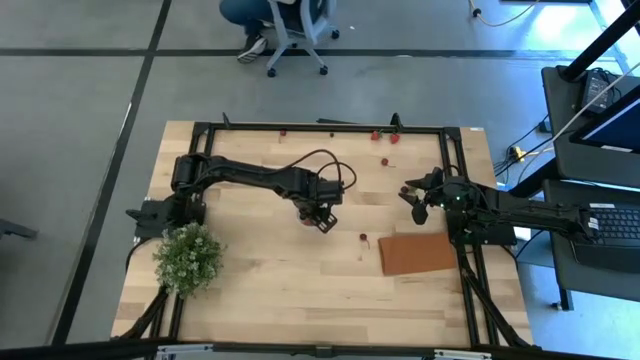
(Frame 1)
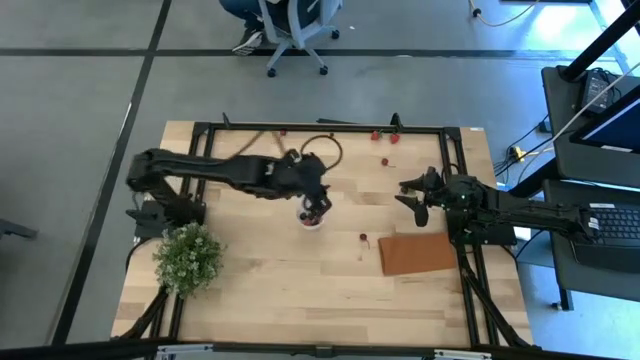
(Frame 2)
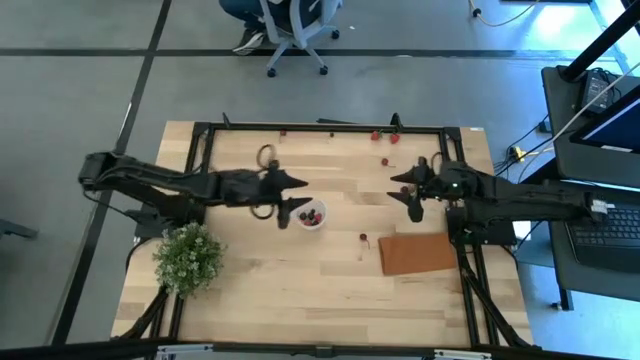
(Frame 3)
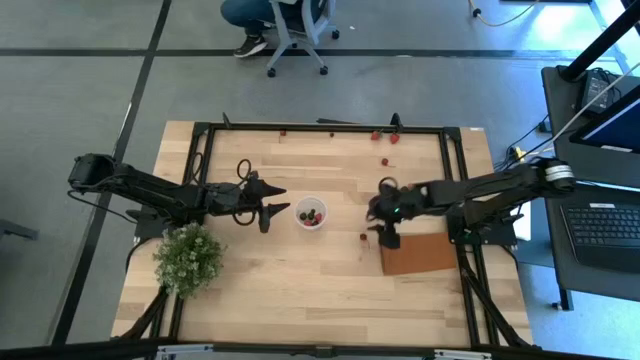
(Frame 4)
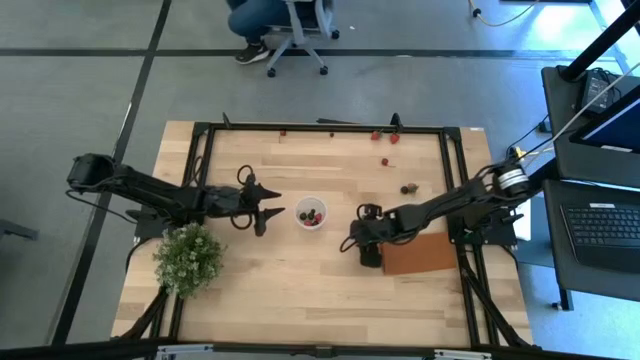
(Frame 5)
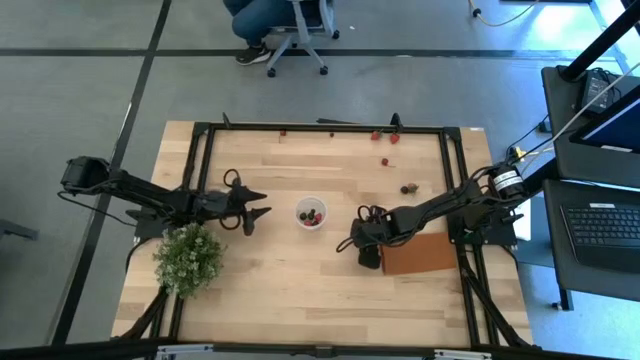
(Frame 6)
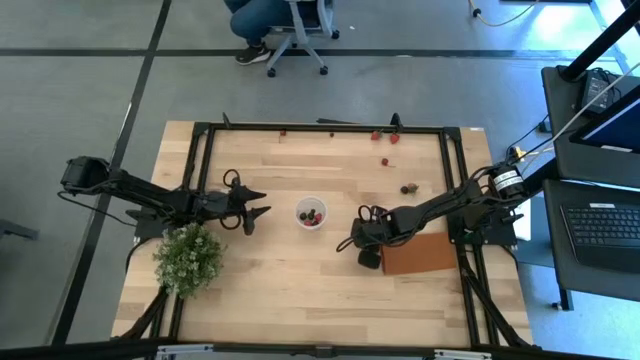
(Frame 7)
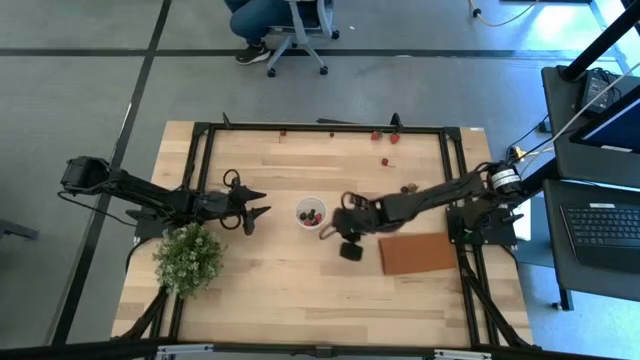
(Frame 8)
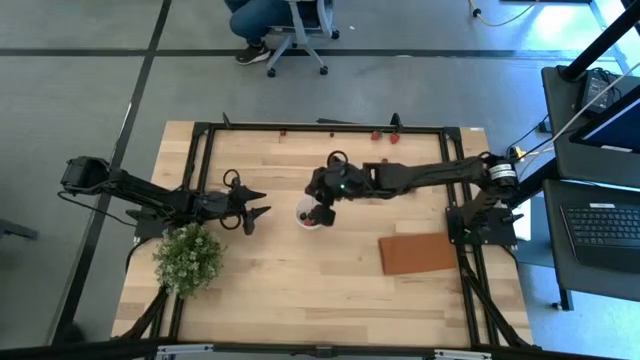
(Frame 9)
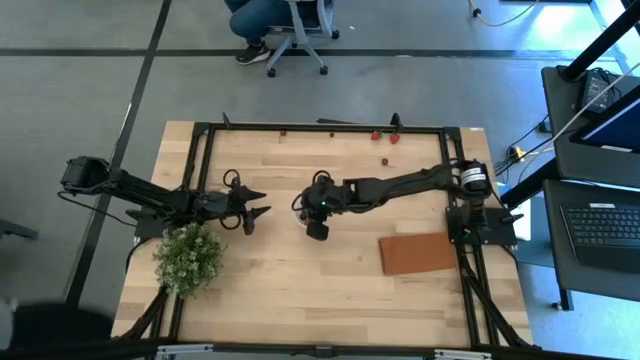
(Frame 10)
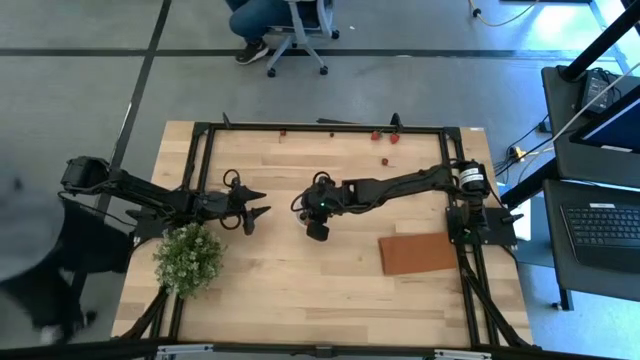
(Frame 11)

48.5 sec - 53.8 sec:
Task: Pick and placing Produce into tupperware
Put the bottom red cherry into the bin

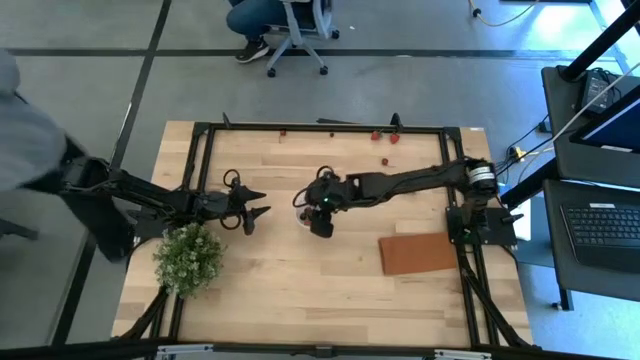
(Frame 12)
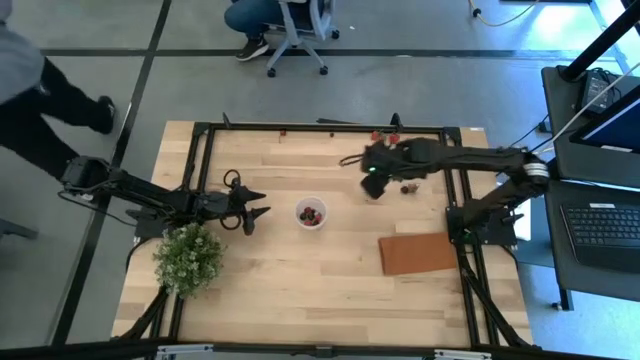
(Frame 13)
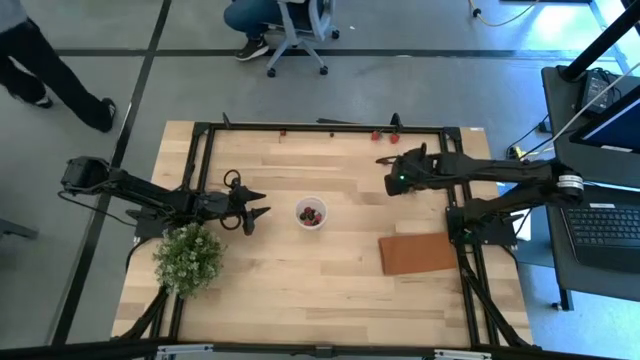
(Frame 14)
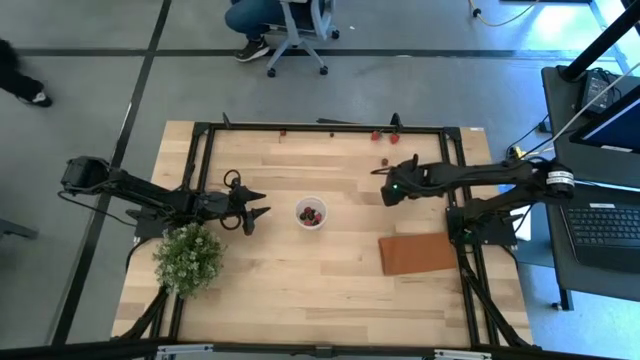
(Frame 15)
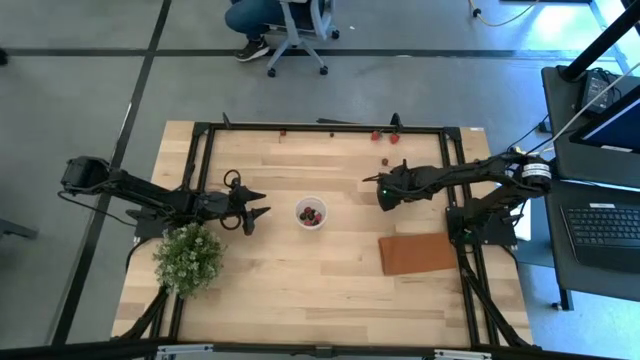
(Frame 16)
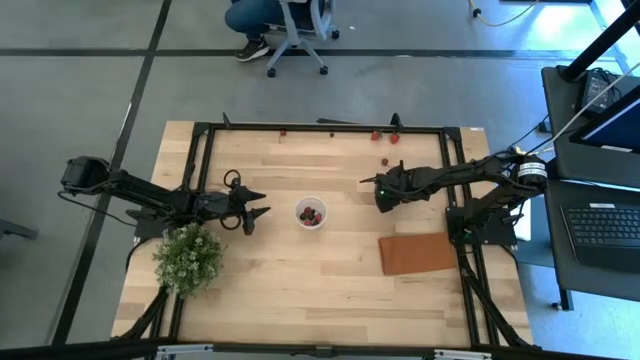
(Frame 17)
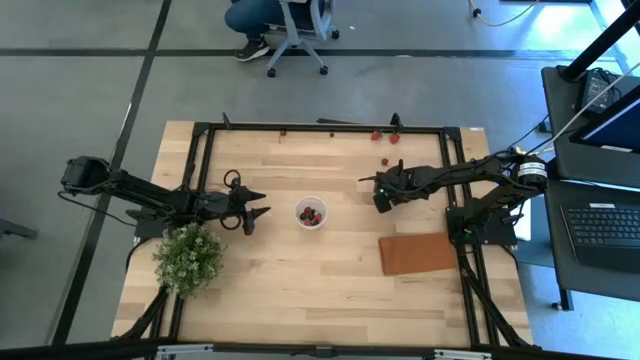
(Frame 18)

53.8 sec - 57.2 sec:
Put the blackberry into the bin

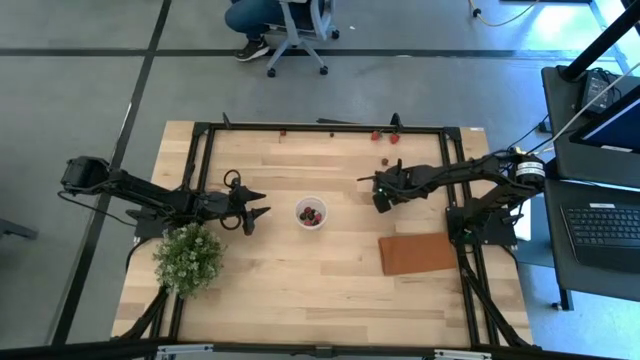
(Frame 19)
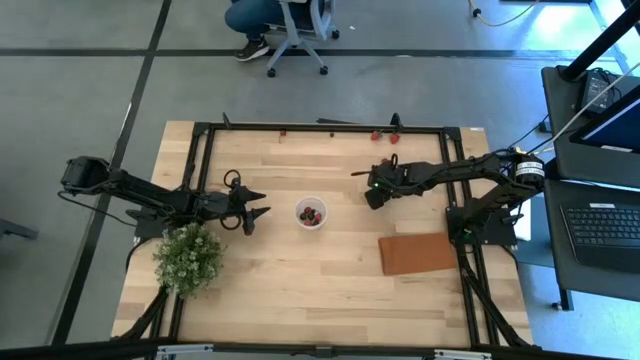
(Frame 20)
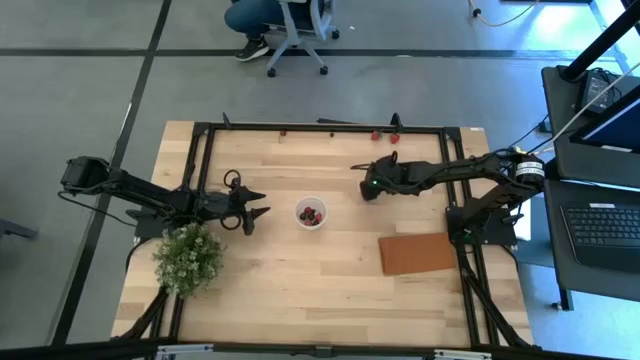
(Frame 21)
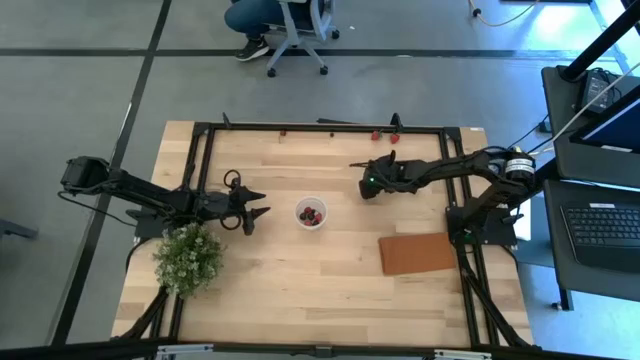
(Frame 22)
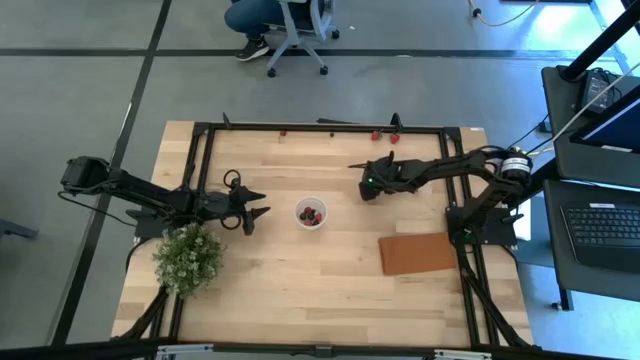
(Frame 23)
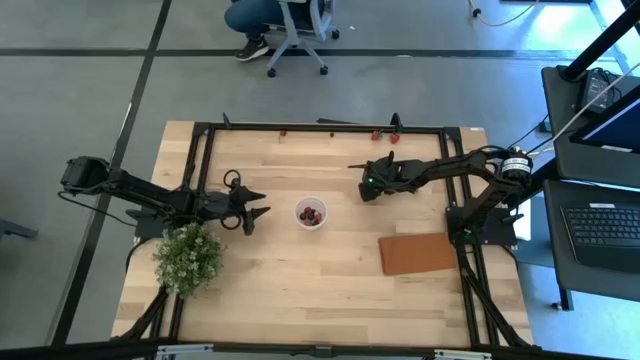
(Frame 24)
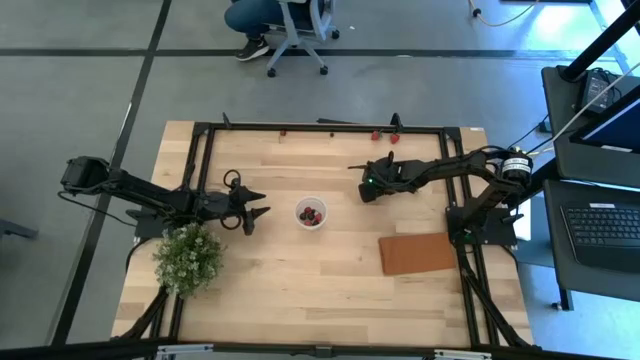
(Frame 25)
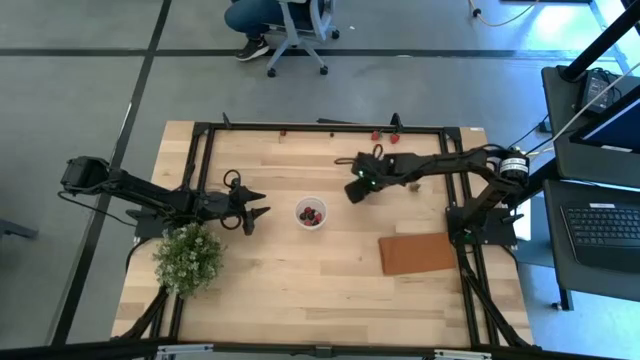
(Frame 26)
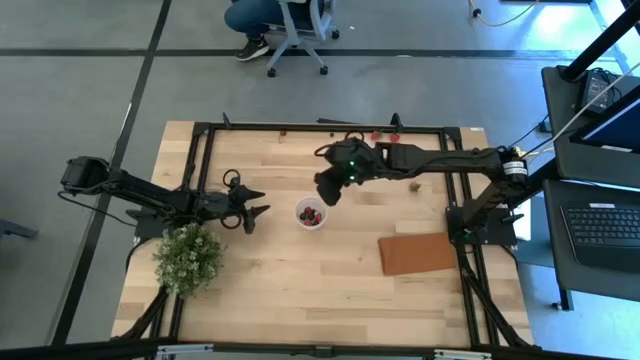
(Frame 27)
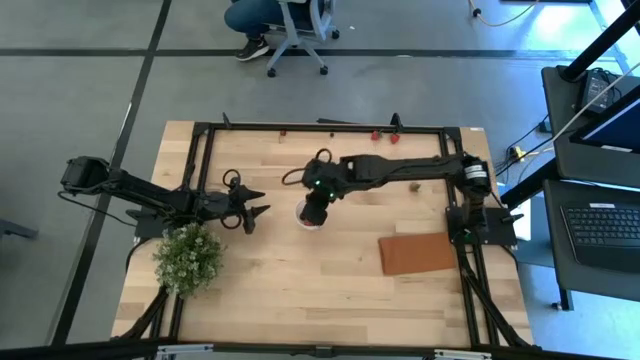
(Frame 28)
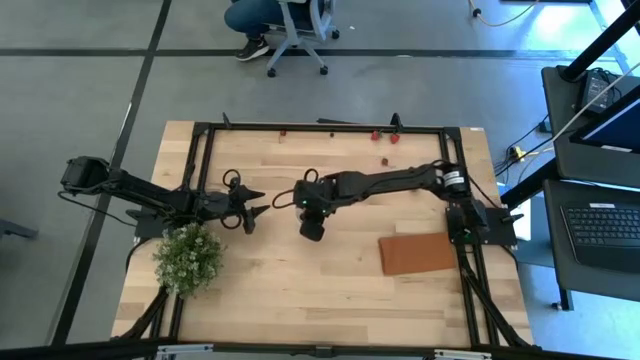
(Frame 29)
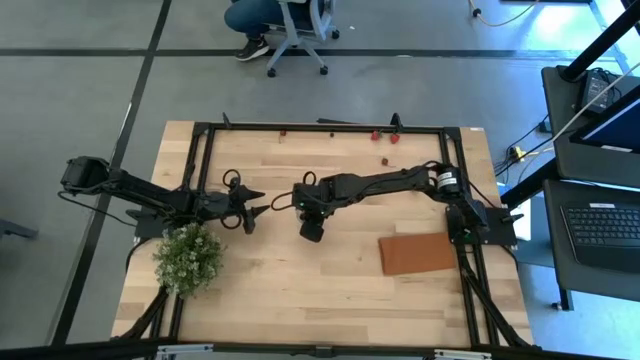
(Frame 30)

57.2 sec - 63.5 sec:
Put the blackberry into the bin

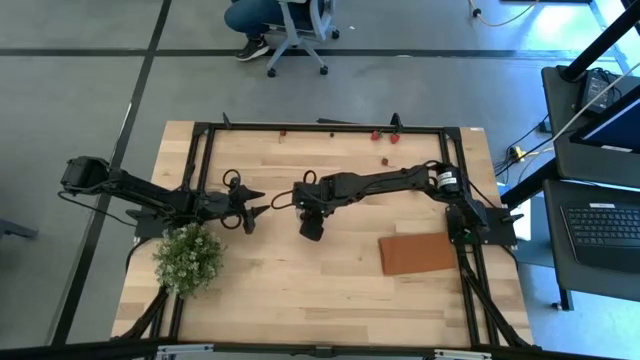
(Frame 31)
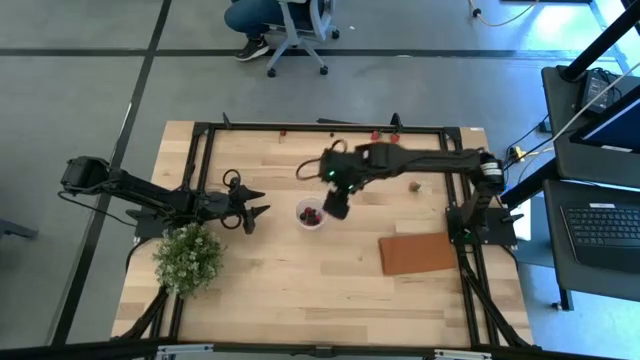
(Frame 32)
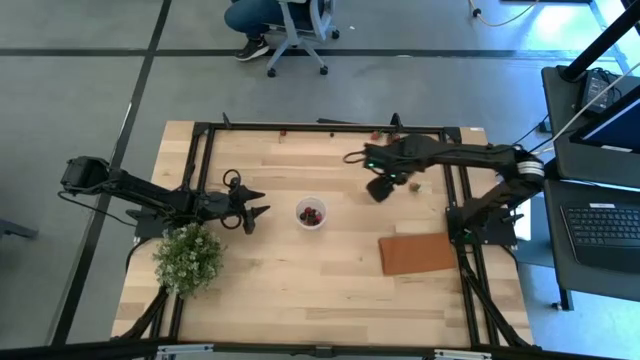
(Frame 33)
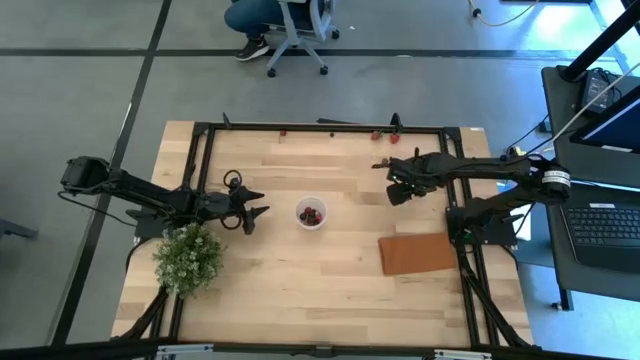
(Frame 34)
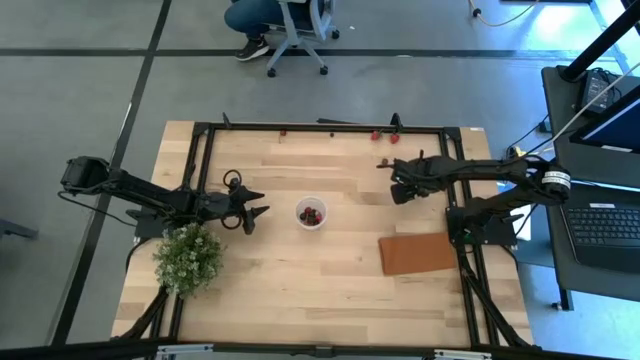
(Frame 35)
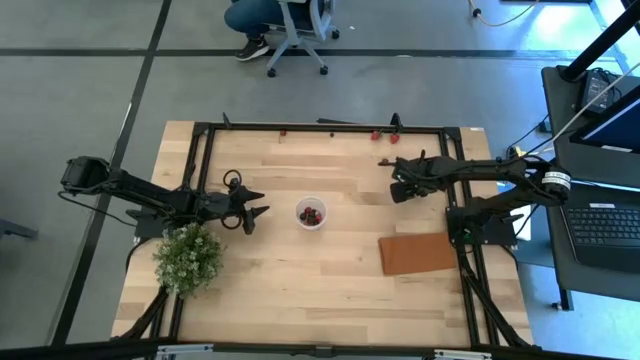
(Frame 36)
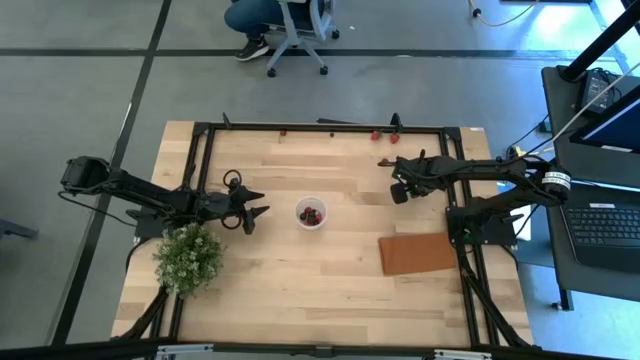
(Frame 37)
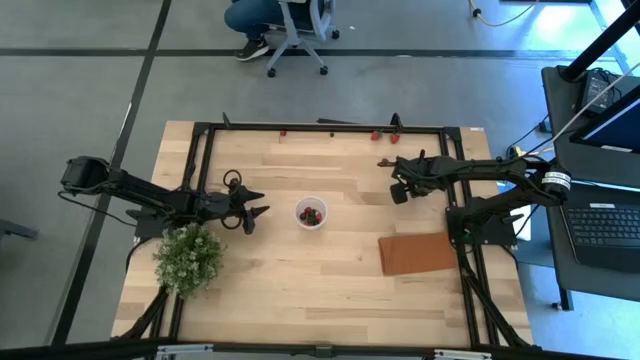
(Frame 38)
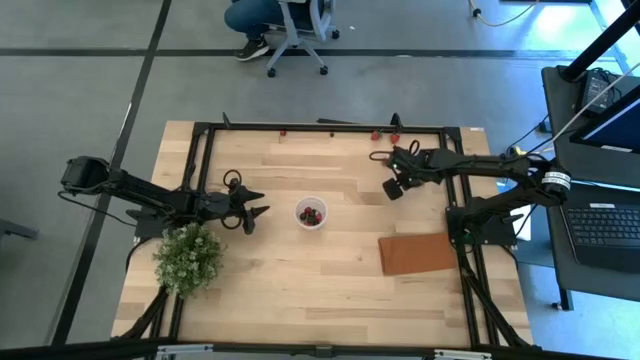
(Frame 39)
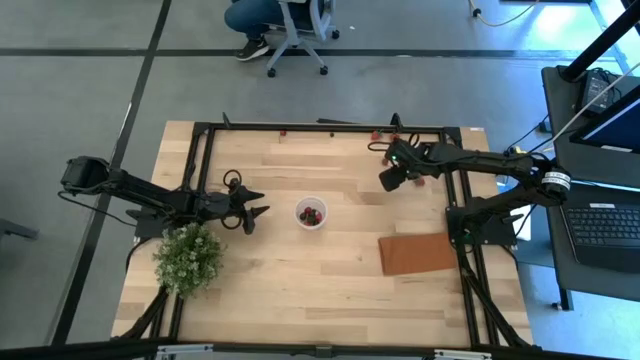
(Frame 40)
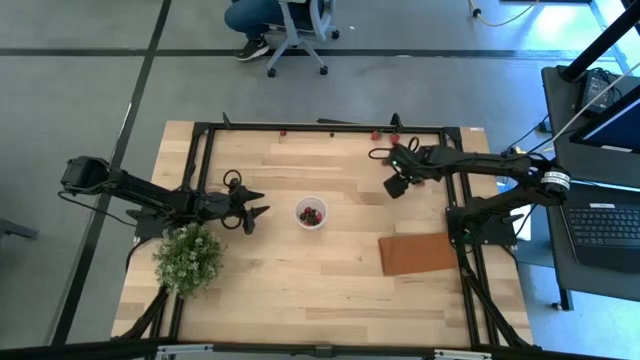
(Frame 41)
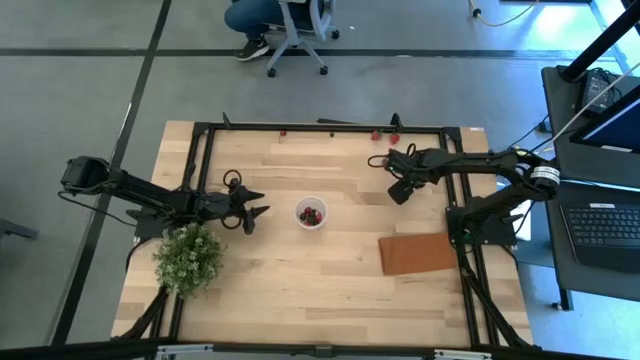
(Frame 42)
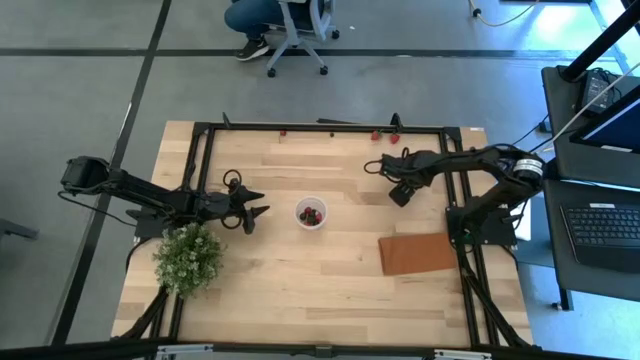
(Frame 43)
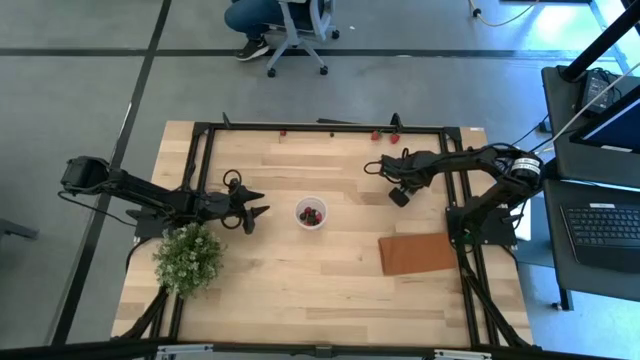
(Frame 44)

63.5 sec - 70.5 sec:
Put the bottom strawberry into the bin
